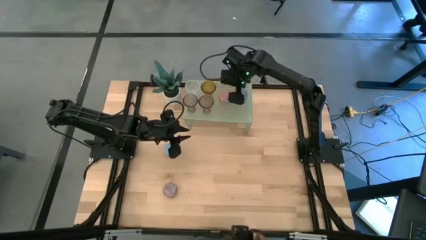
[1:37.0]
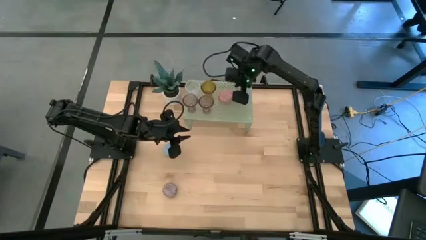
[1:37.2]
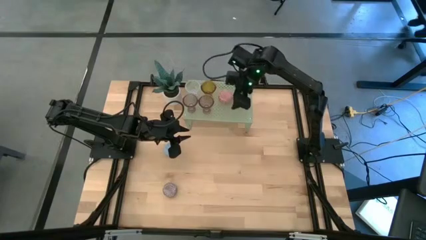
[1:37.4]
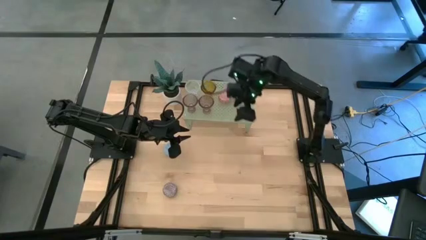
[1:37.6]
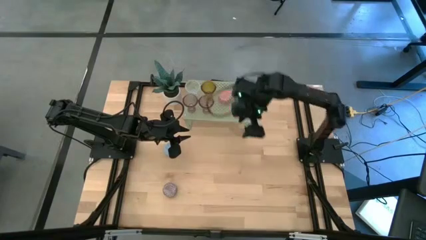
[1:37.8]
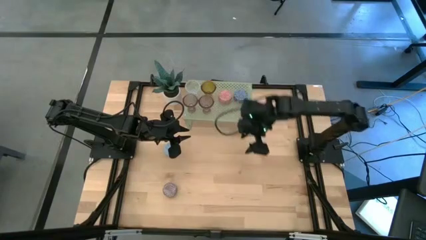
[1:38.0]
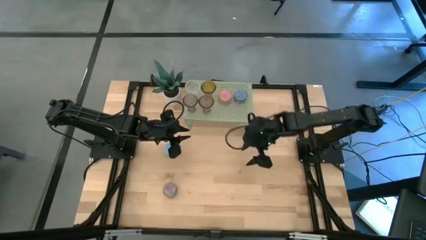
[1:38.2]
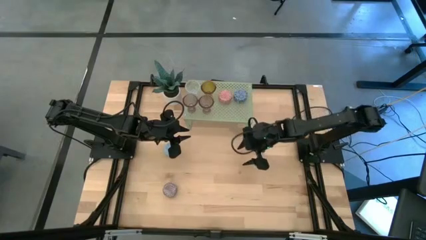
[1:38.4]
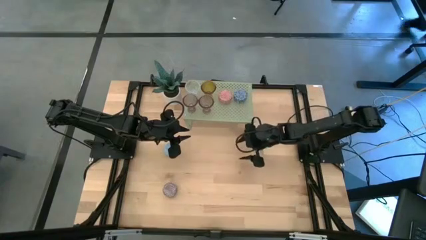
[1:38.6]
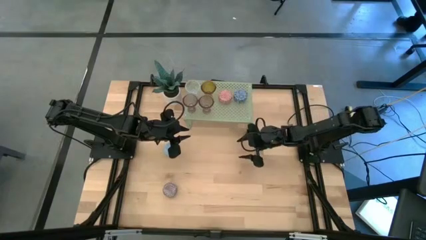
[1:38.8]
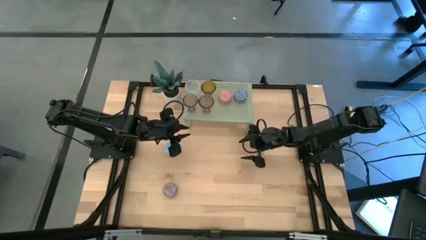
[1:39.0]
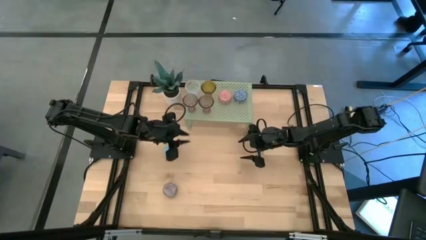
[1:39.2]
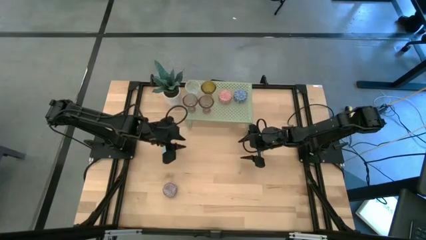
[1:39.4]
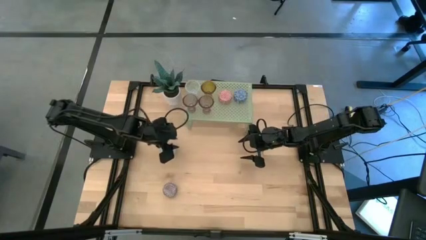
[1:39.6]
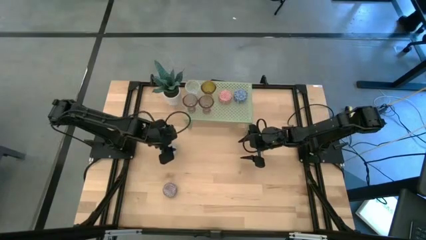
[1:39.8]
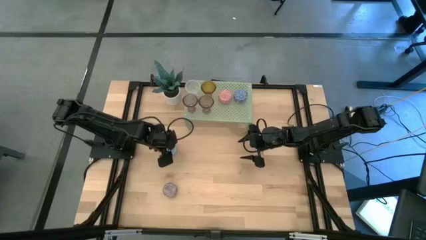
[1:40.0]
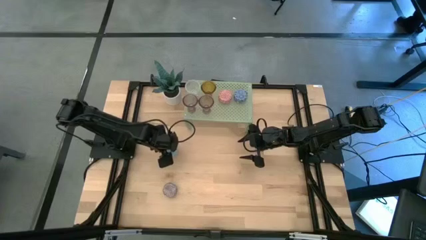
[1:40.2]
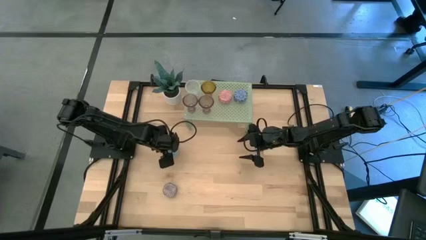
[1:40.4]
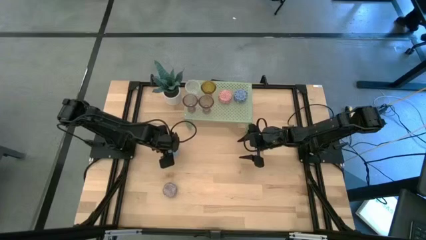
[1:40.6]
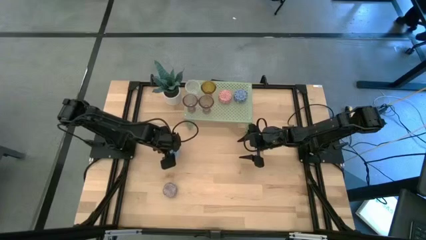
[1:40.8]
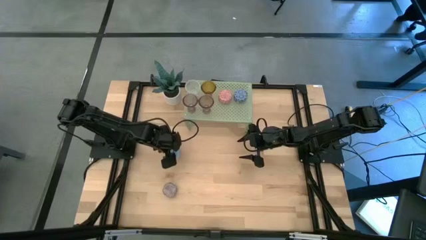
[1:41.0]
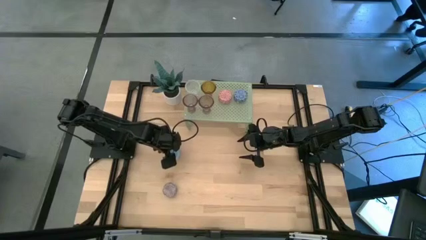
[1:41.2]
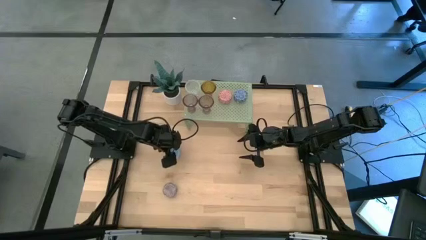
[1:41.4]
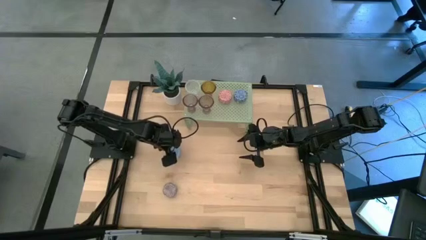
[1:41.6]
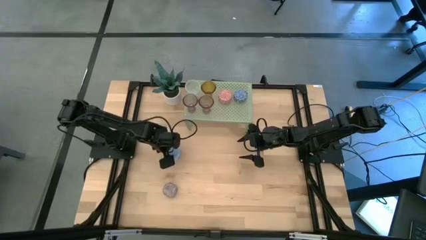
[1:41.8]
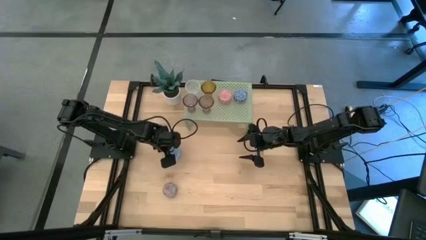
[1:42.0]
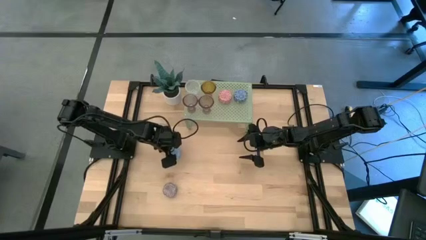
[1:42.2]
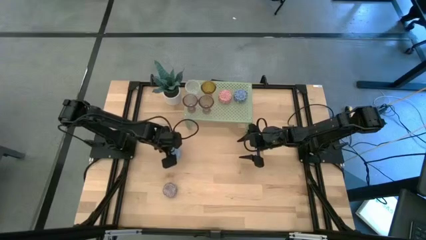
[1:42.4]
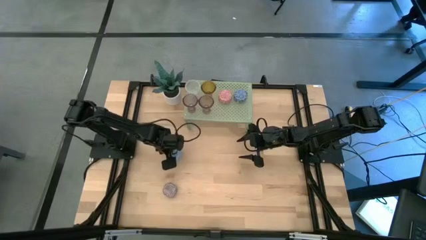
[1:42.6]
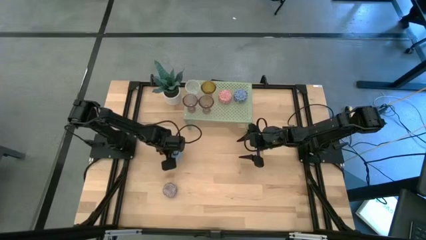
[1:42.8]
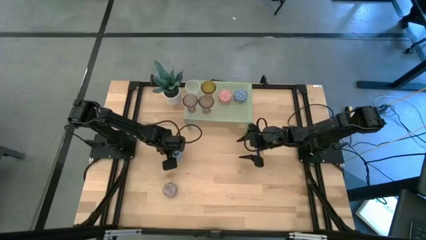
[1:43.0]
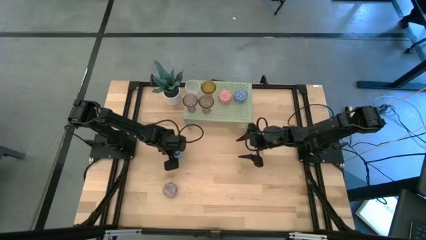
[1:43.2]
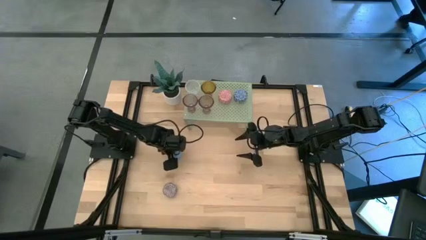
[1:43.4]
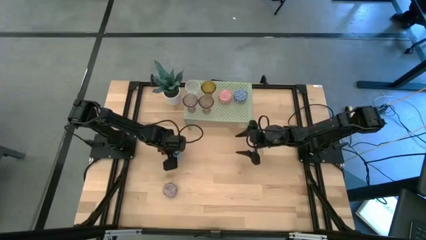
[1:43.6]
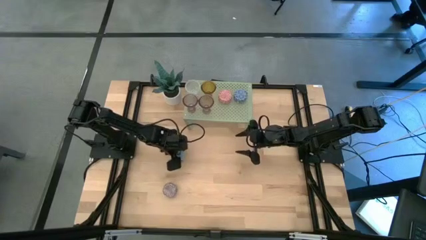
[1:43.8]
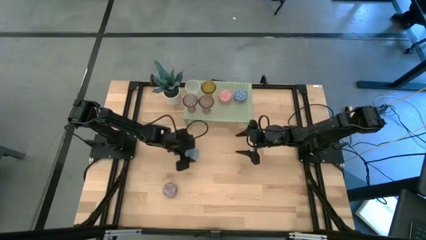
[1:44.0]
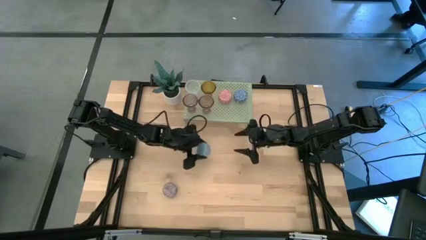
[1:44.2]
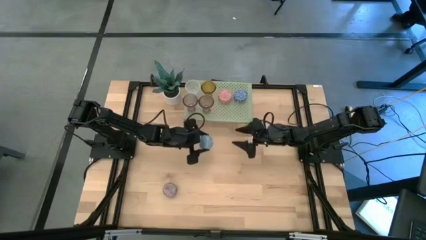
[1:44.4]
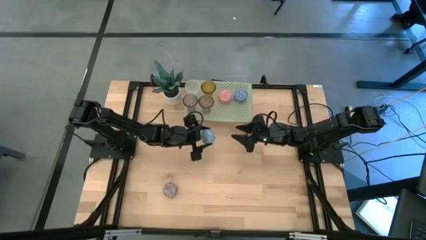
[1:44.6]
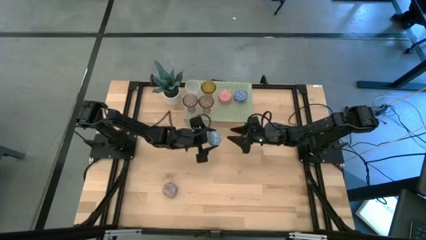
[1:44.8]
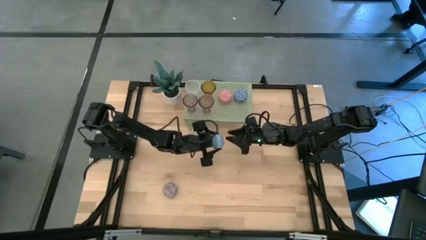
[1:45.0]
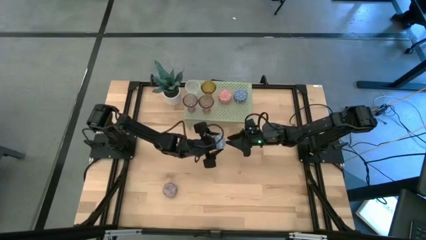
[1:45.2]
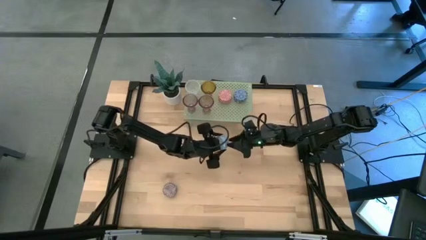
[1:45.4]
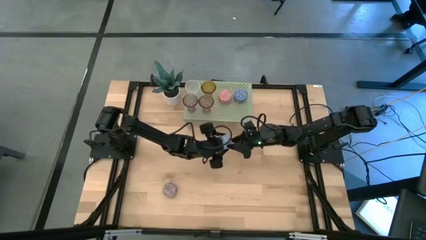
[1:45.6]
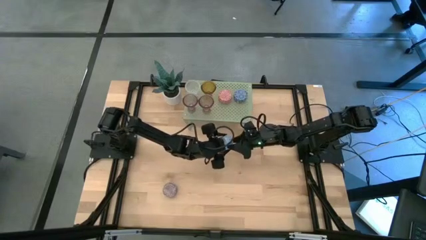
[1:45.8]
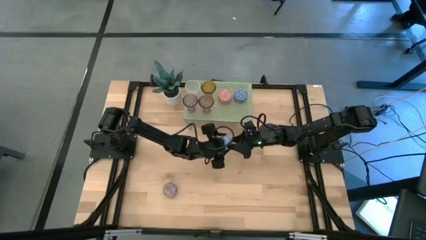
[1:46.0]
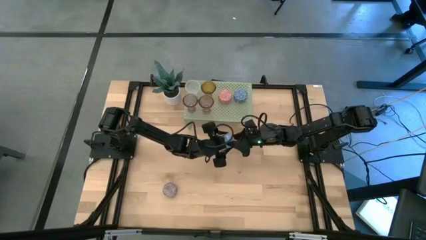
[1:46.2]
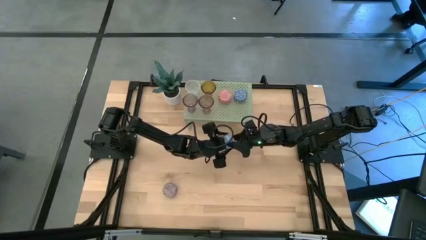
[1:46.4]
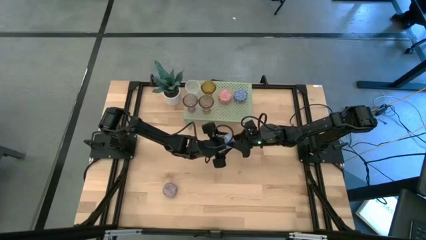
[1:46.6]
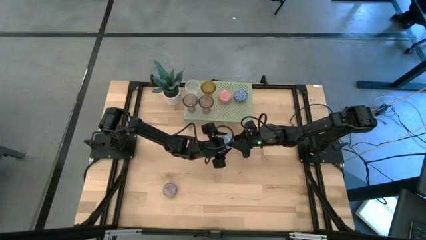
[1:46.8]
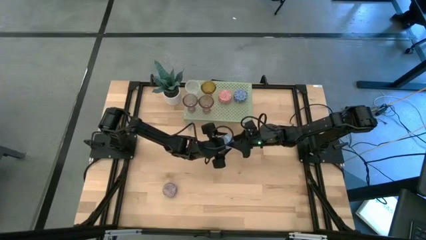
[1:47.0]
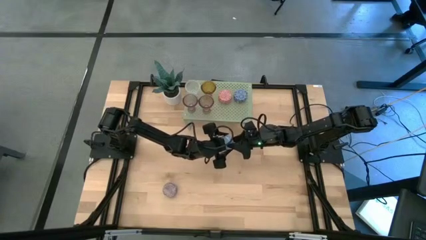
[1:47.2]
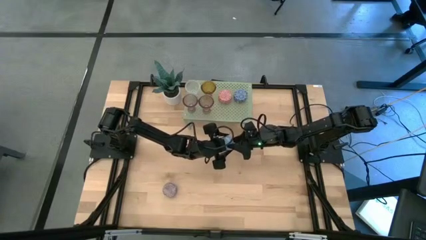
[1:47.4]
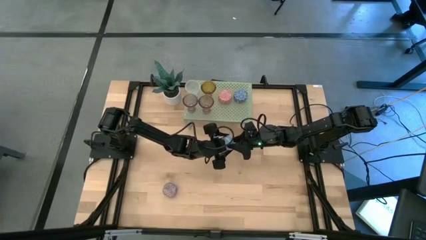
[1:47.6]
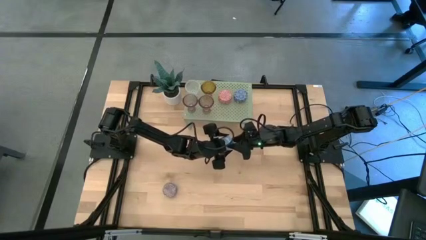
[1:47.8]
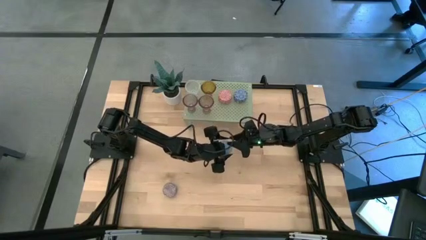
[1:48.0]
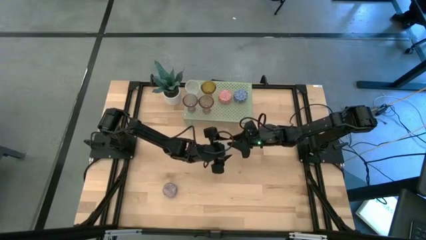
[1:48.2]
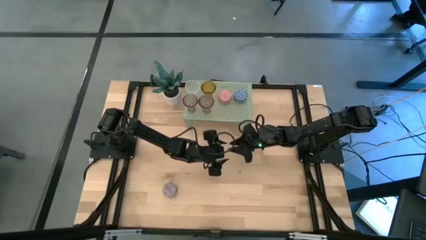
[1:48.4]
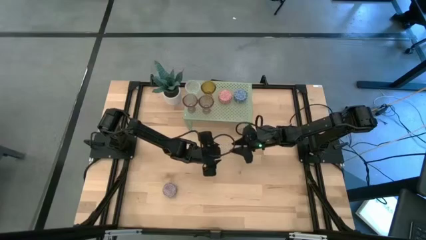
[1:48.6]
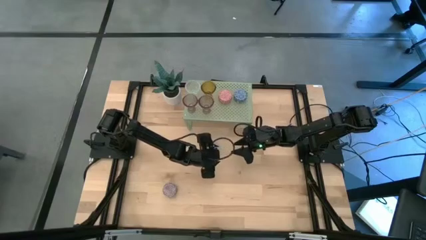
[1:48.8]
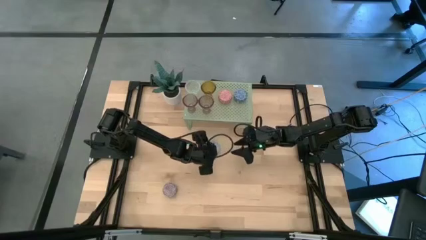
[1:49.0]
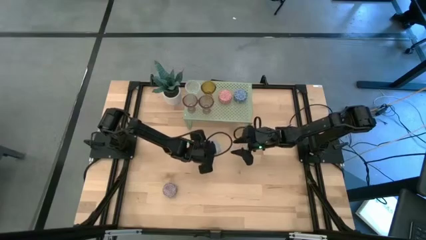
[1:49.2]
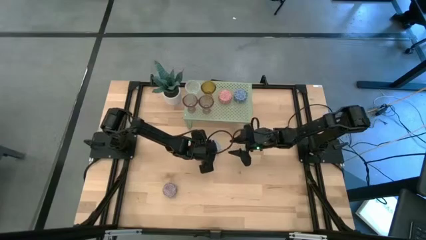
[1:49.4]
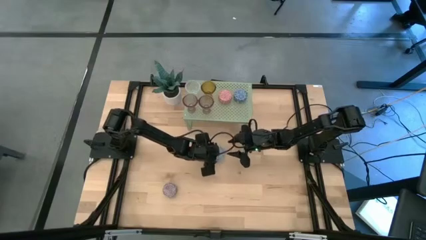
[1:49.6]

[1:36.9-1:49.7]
Task: Pick & Place candle stick holders
Put the light blue scented candle on the shelf

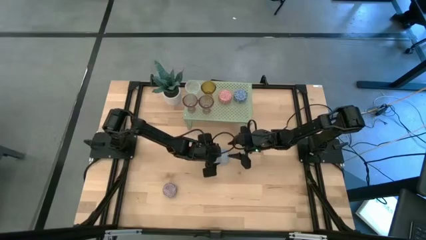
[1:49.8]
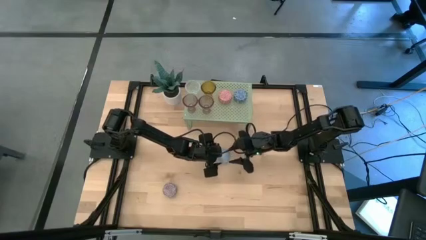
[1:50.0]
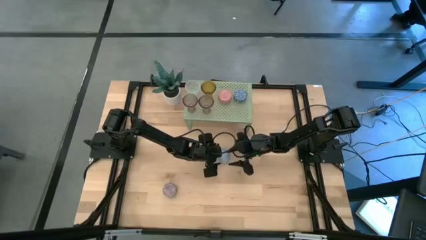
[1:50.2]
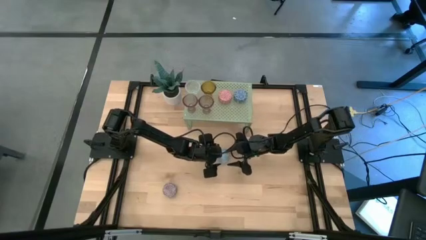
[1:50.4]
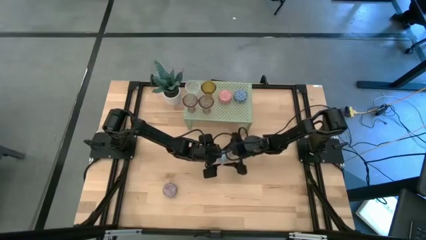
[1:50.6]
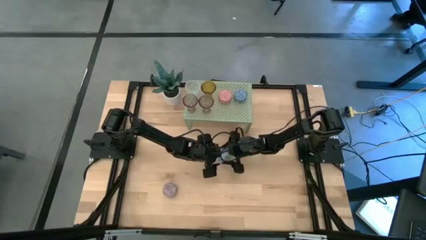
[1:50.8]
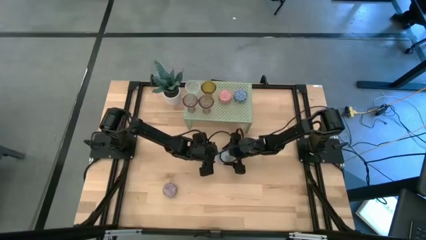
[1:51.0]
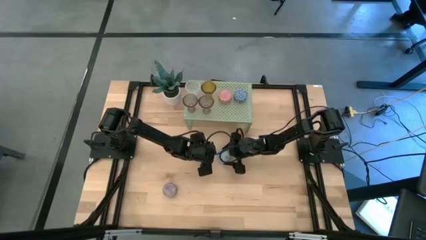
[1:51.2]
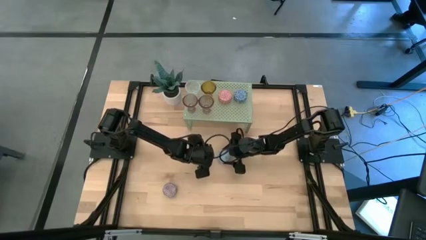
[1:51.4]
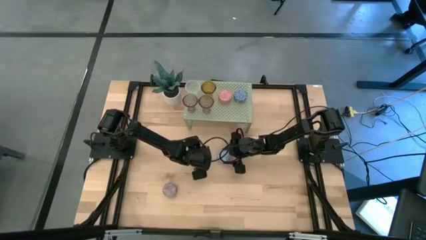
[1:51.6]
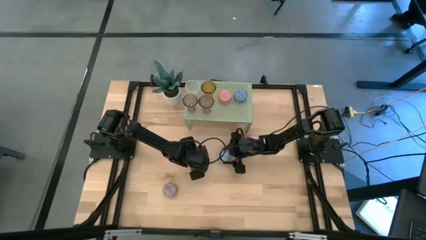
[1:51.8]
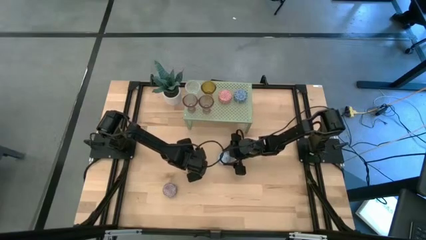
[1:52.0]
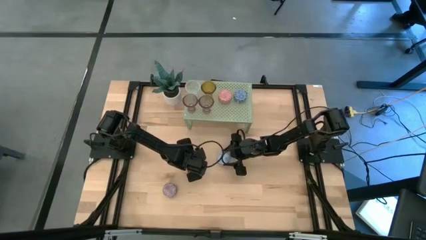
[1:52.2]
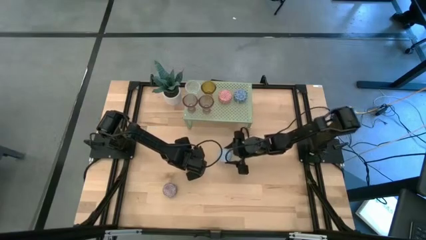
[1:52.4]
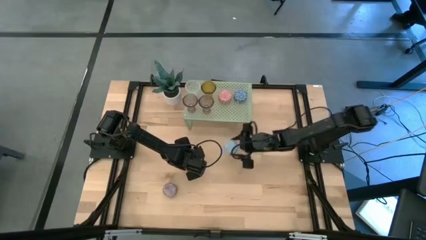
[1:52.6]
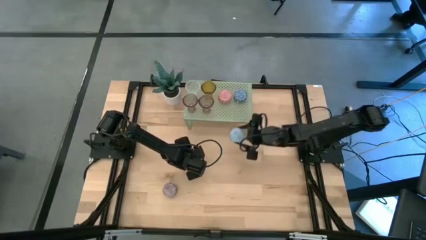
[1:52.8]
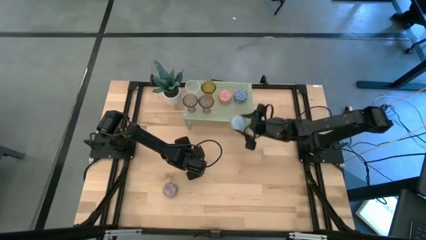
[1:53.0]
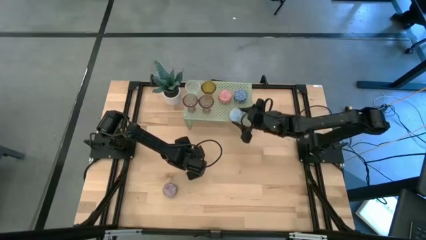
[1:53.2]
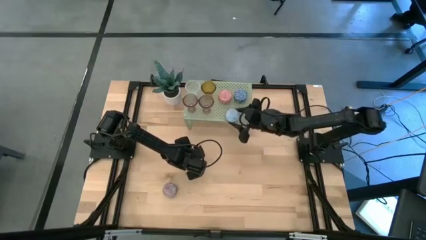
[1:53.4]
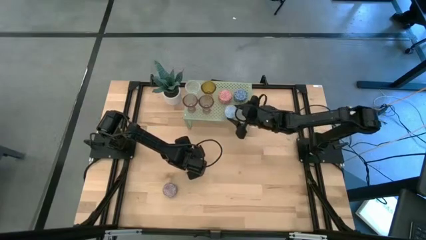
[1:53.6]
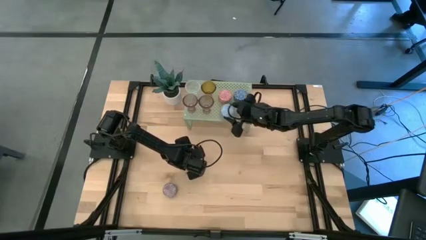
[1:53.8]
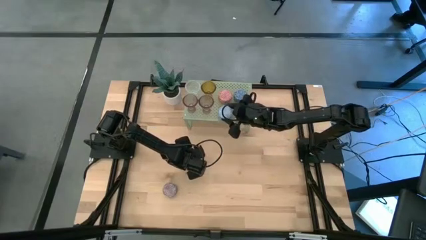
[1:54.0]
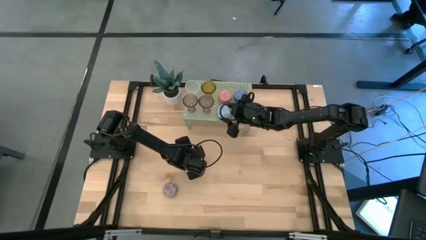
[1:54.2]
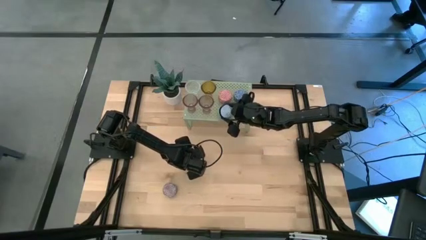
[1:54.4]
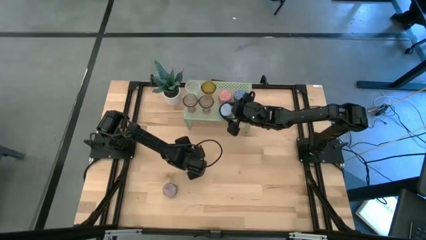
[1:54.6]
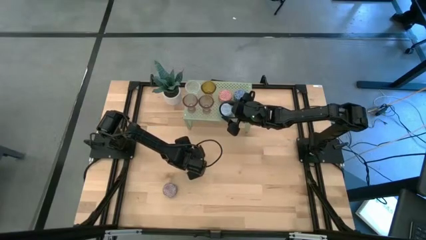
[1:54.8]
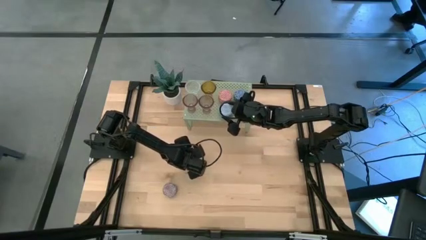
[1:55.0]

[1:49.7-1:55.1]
Put the light blue scented candle on the shelf
